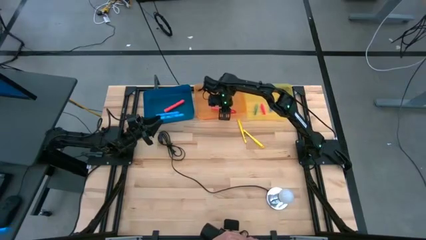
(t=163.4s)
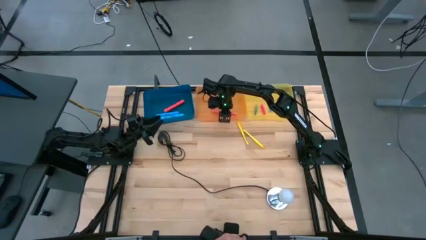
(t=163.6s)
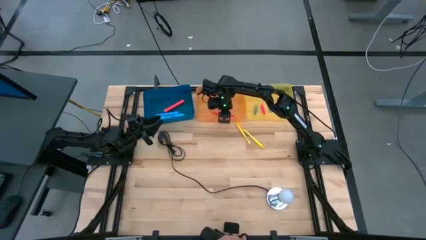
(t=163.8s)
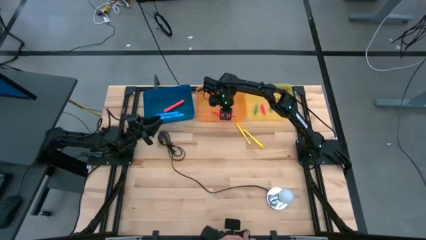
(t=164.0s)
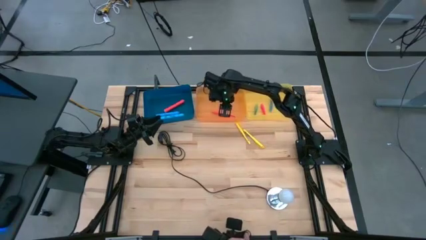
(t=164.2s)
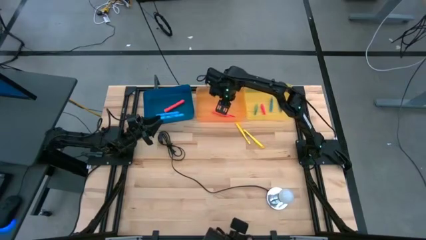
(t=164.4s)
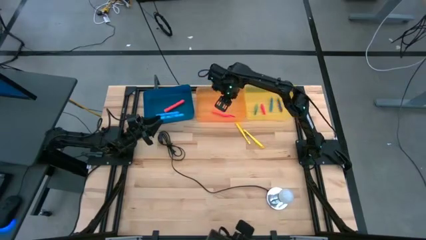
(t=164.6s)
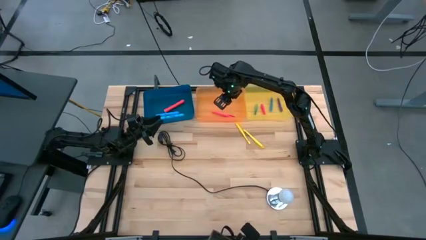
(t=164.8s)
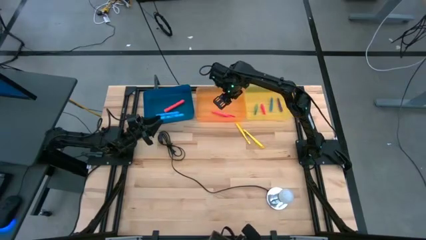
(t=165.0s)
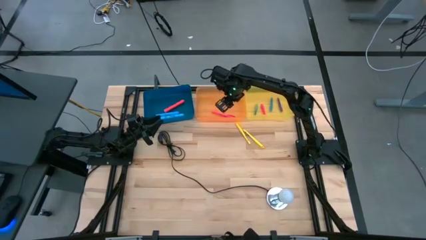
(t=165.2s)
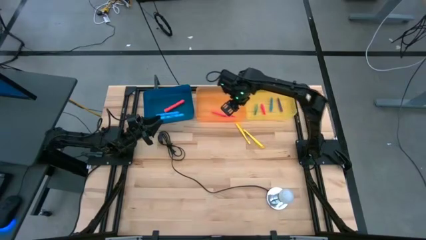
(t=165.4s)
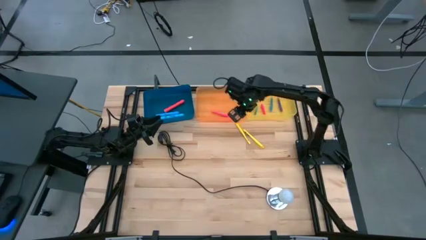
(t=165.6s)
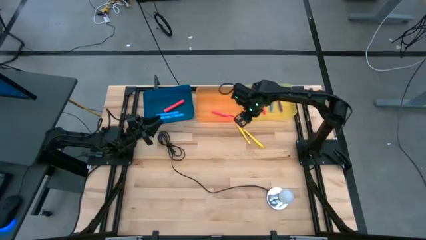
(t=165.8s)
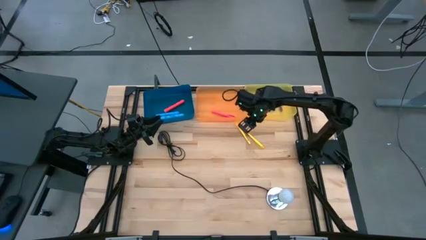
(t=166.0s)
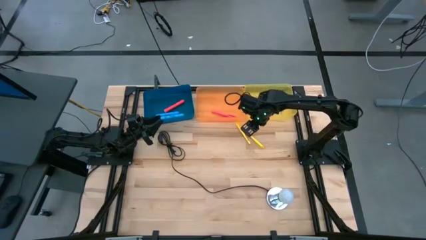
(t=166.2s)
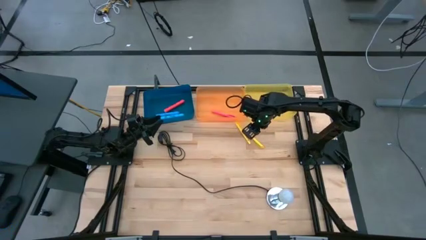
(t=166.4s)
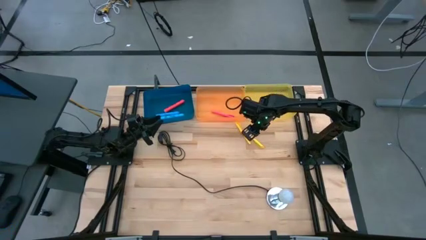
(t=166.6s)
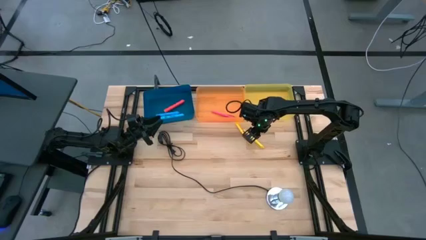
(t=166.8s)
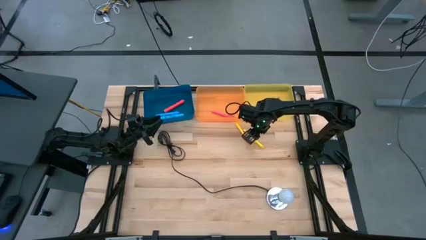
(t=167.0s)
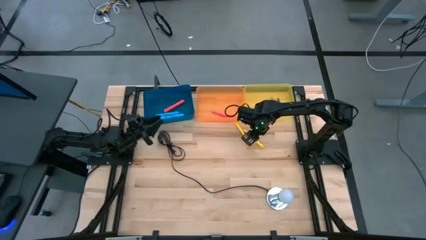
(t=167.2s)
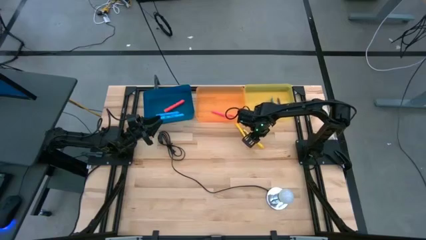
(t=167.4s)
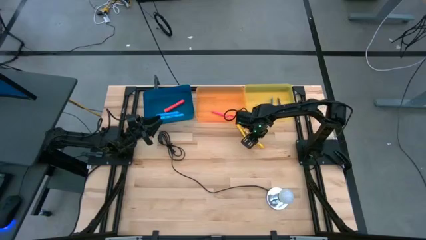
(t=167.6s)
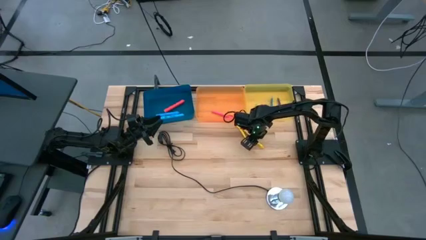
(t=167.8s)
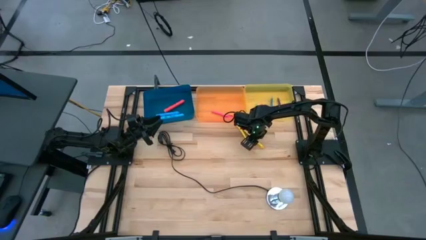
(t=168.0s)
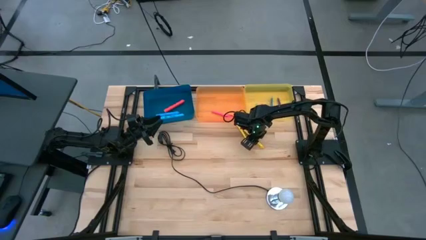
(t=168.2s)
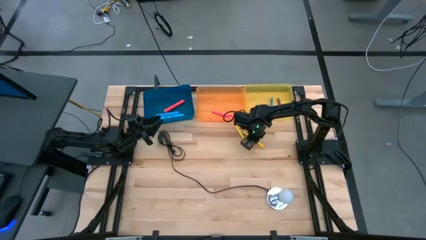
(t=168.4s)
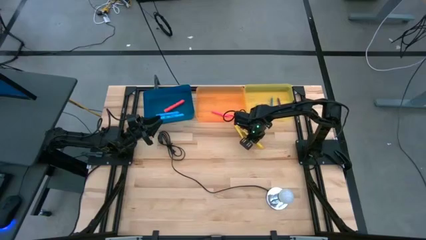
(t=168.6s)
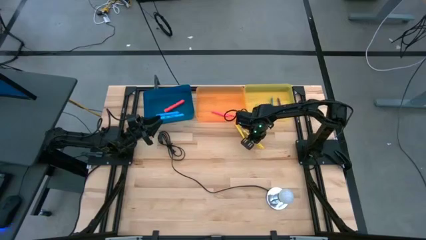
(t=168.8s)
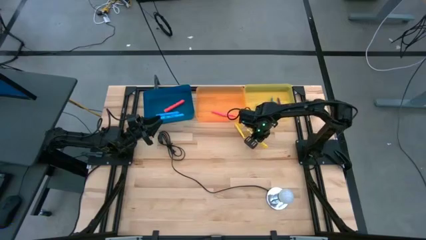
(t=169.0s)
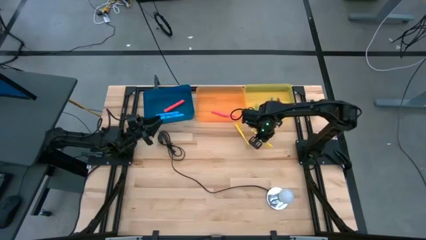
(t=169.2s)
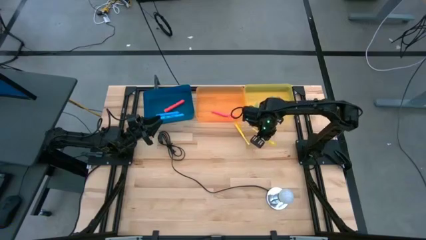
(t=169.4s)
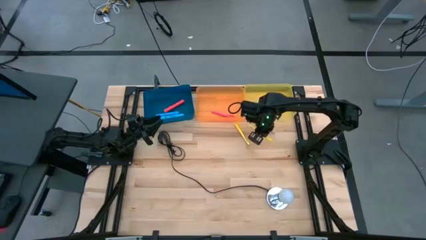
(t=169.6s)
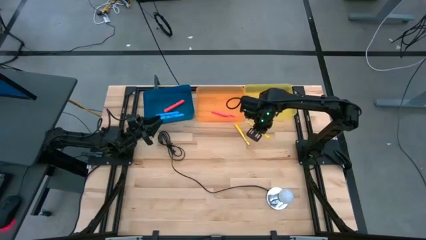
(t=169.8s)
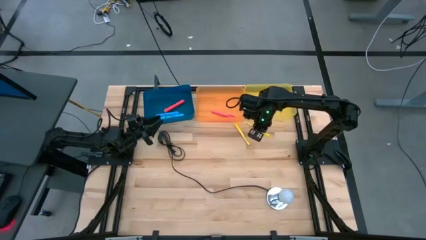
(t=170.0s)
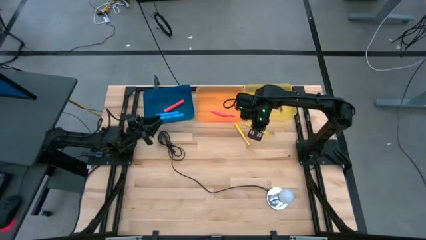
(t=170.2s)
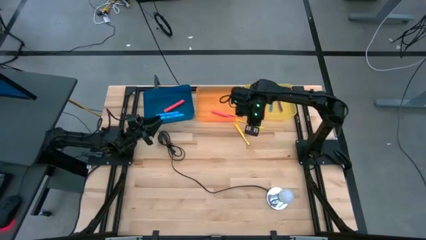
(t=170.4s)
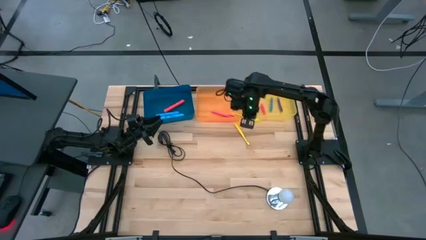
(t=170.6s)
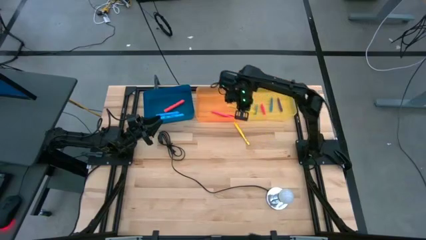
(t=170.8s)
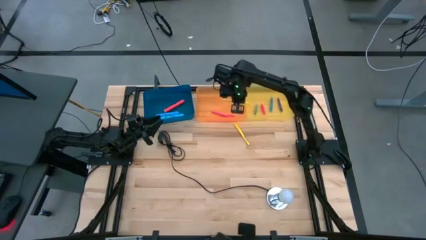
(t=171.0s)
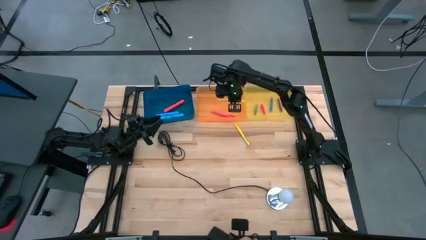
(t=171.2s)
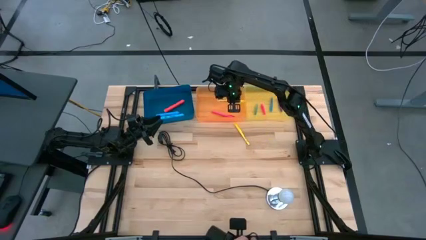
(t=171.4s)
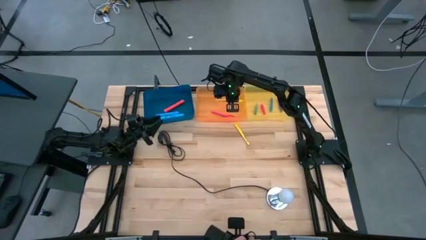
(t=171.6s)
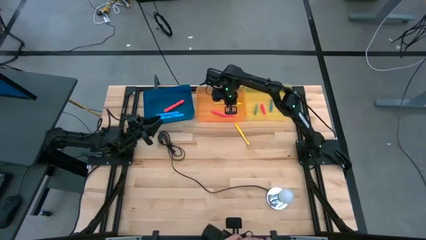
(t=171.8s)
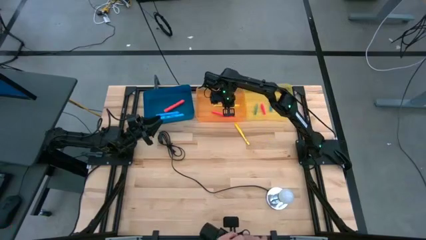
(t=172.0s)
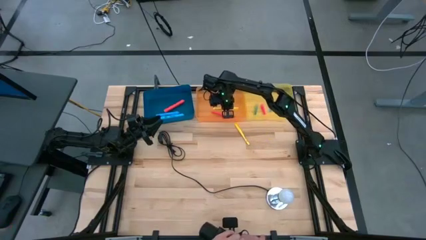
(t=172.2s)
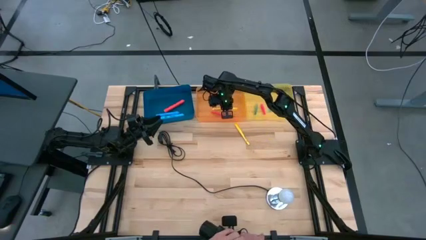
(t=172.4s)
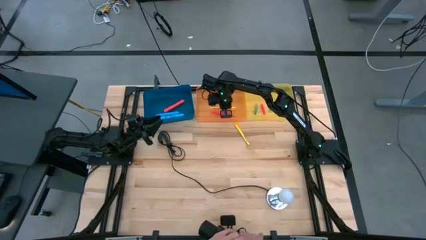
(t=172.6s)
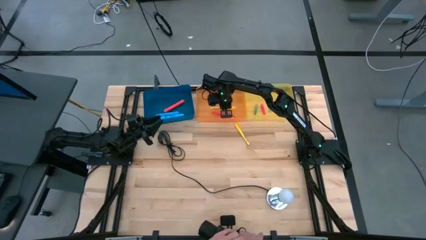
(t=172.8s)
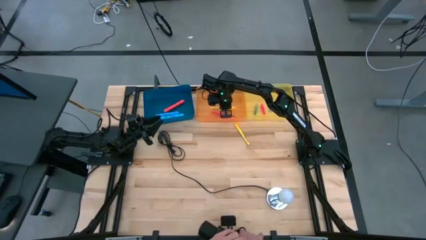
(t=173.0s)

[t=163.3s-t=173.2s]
Task: Pick & Place Markers
Put the right large yellow pen into the orange bin

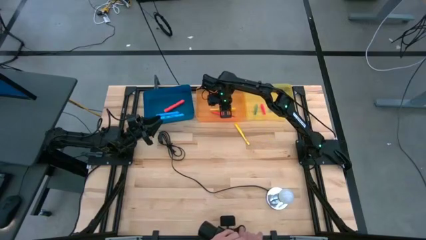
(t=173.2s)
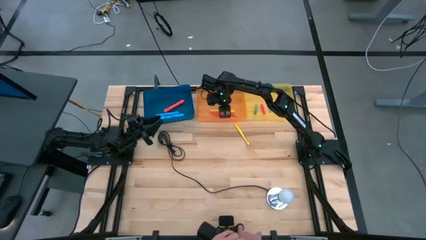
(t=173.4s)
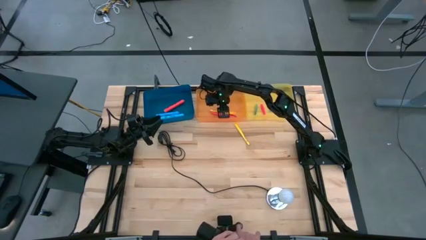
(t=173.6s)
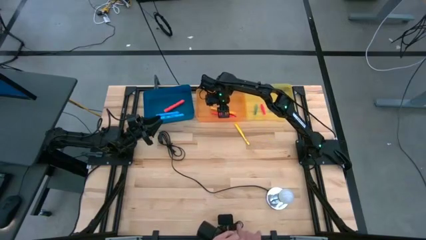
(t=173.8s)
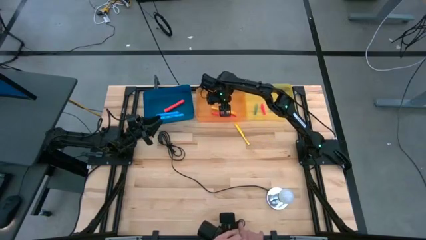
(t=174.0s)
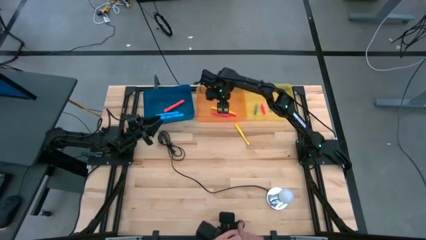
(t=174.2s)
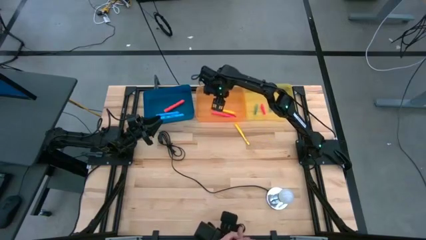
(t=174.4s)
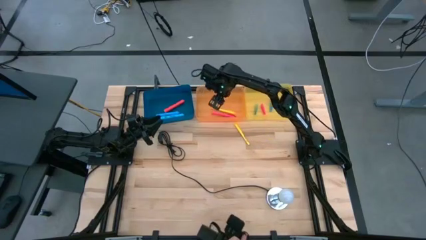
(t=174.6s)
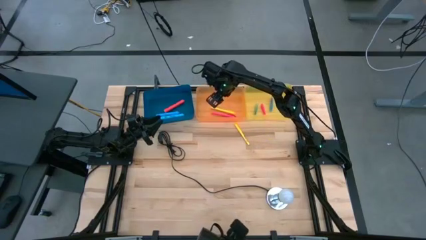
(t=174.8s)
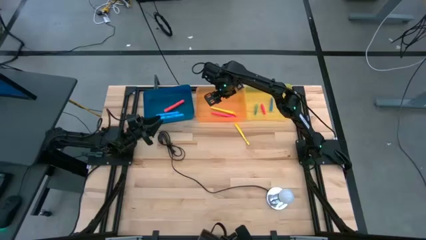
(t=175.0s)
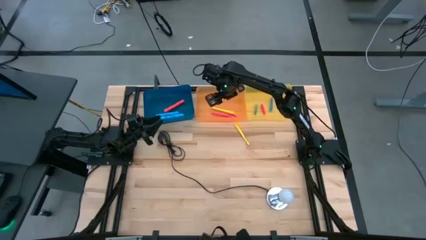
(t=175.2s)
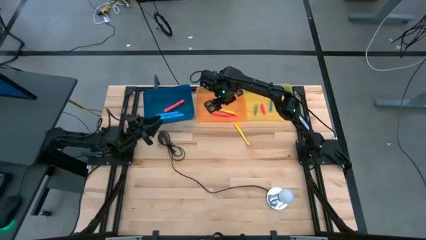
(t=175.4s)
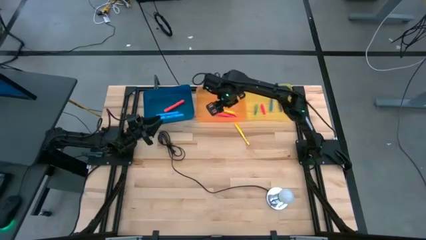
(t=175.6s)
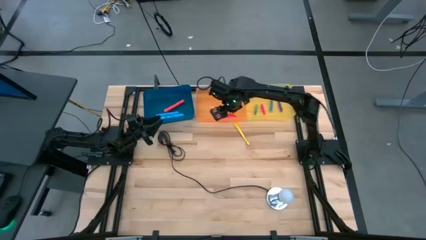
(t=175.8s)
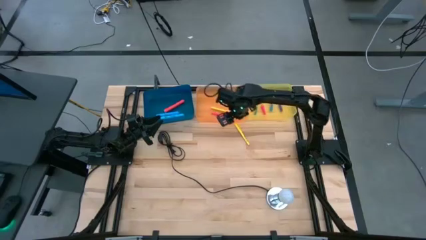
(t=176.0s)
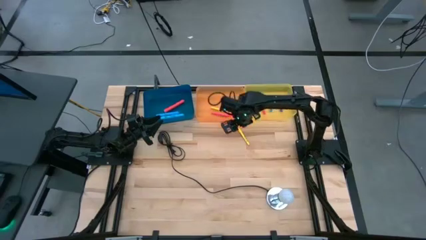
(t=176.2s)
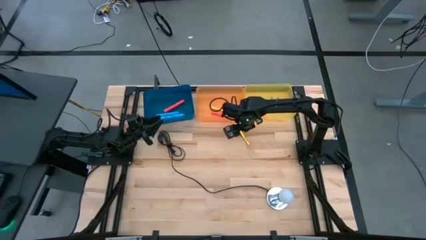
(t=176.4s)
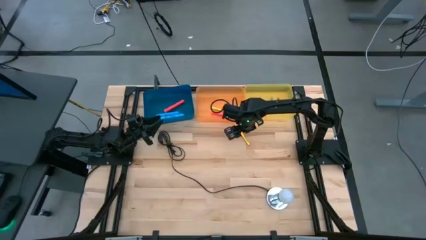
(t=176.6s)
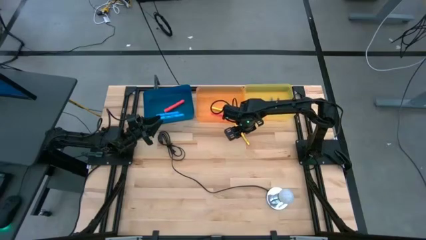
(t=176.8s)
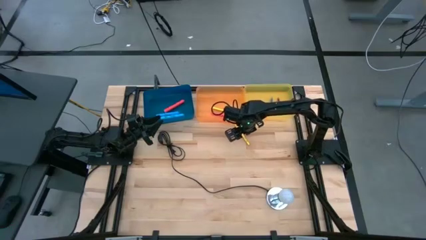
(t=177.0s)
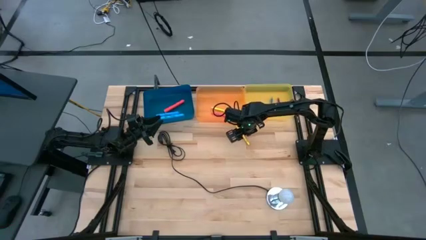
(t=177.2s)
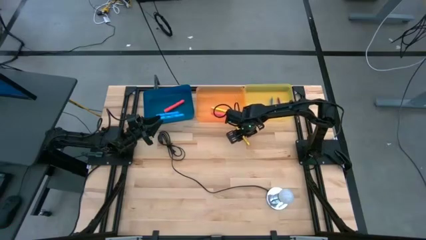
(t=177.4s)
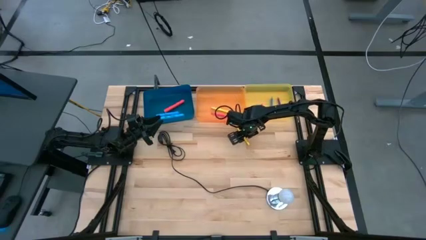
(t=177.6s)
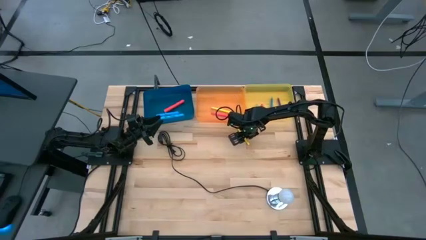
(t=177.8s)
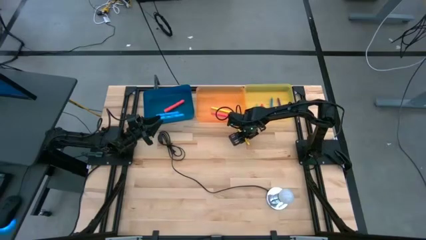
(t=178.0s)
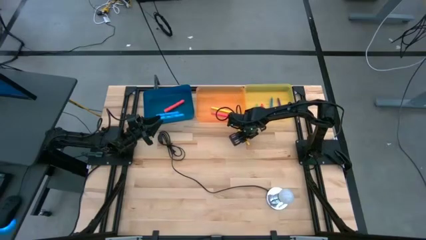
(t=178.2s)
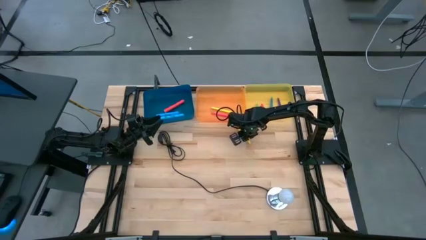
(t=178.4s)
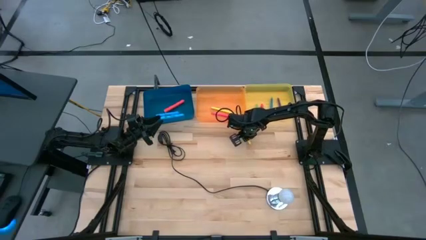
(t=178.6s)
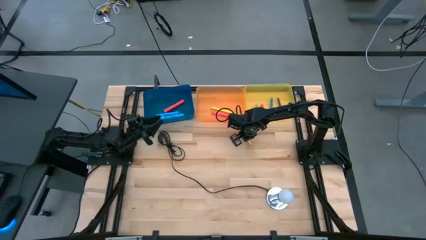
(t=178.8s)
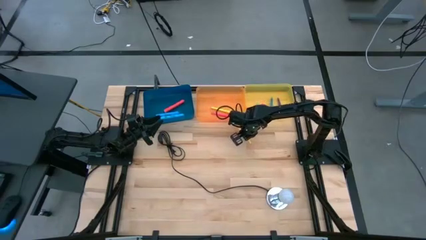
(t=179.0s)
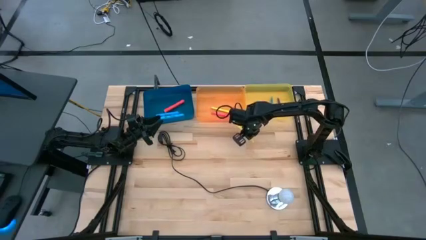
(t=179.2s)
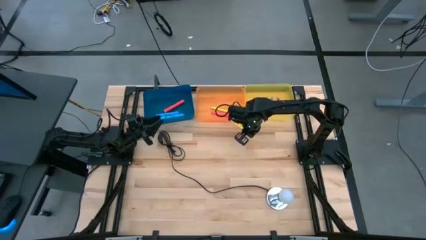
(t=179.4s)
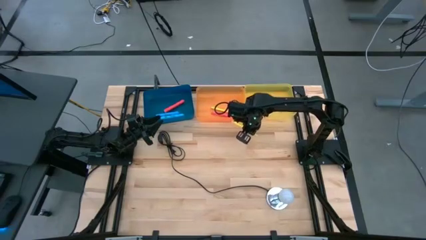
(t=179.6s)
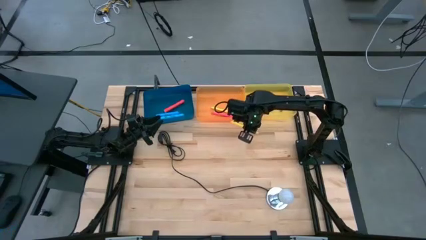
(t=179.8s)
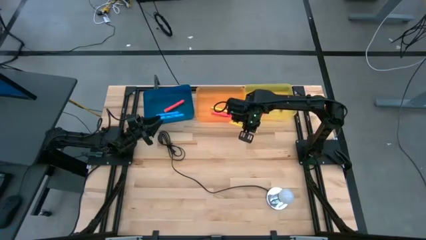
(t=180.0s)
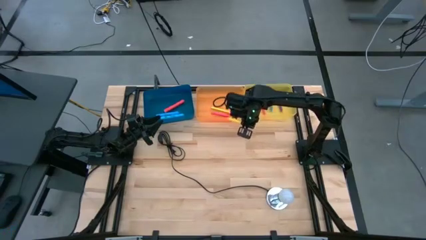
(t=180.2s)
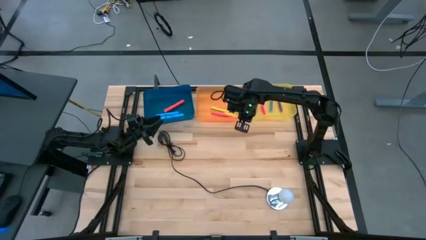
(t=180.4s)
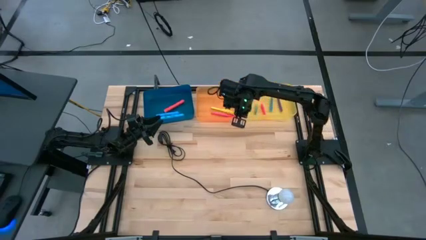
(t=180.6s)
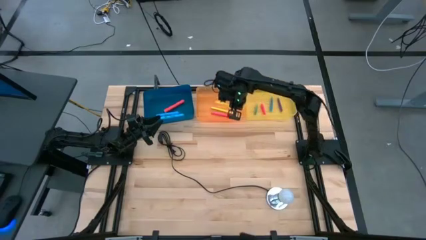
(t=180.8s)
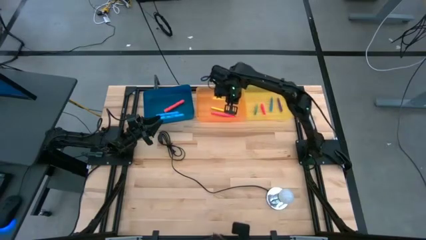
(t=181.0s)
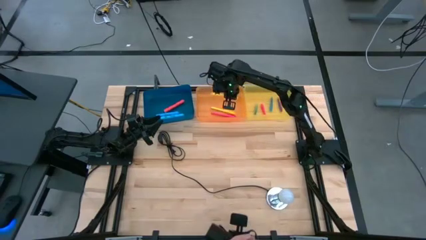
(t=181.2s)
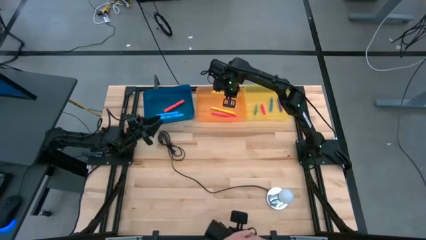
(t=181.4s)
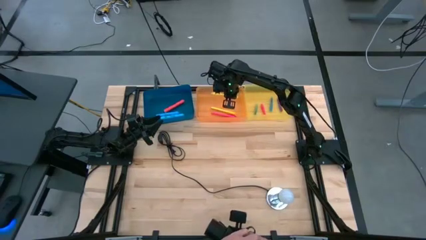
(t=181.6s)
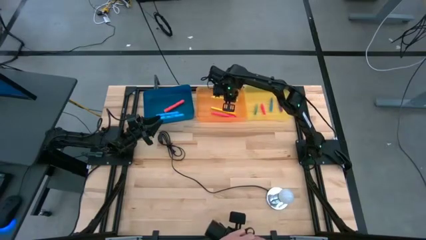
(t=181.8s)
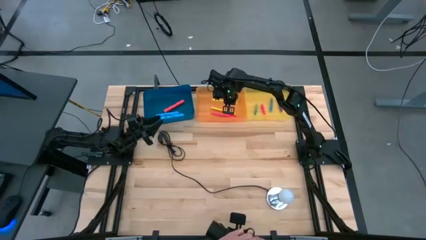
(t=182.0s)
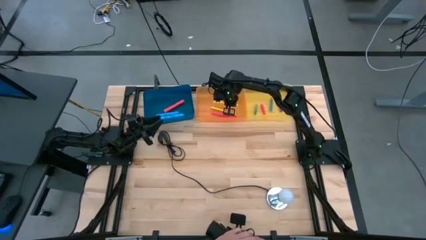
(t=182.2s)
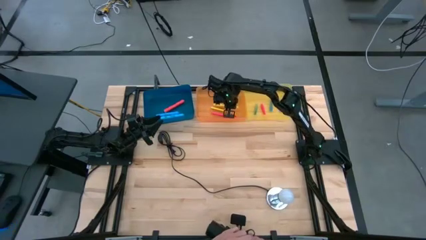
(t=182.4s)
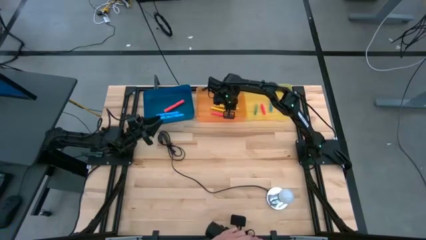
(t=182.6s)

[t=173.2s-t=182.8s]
Put the large yellow pen into the orange bin
